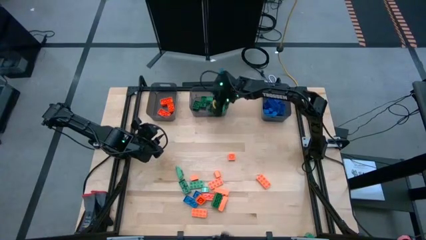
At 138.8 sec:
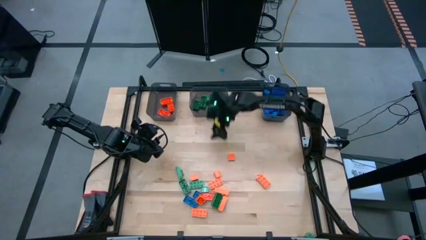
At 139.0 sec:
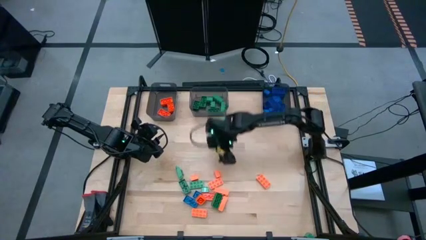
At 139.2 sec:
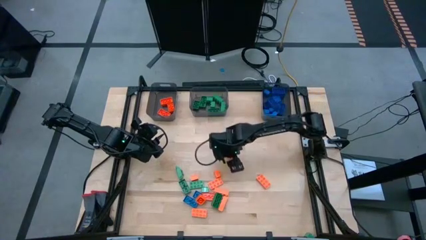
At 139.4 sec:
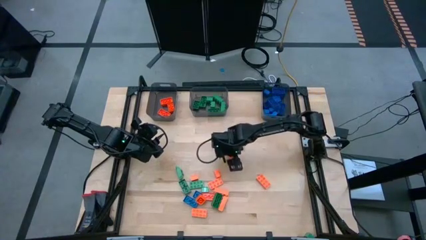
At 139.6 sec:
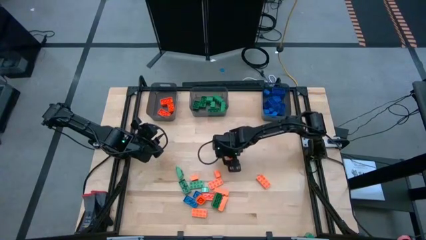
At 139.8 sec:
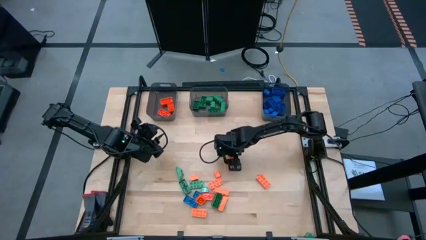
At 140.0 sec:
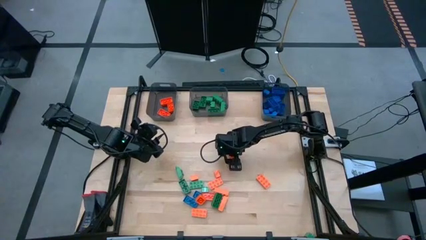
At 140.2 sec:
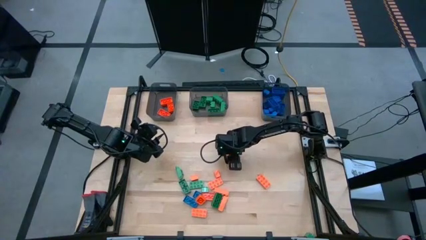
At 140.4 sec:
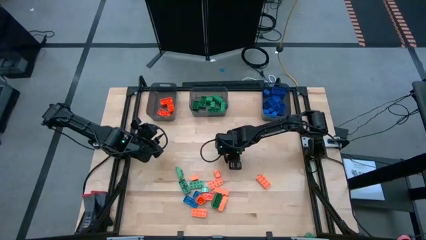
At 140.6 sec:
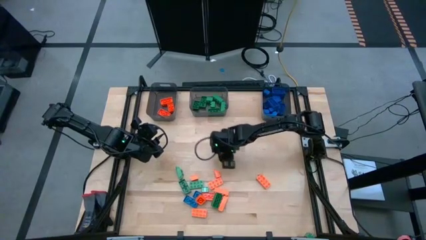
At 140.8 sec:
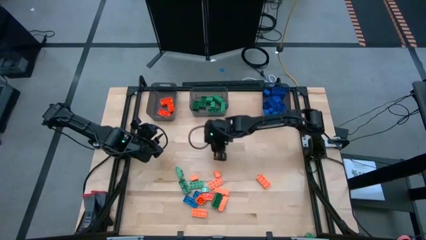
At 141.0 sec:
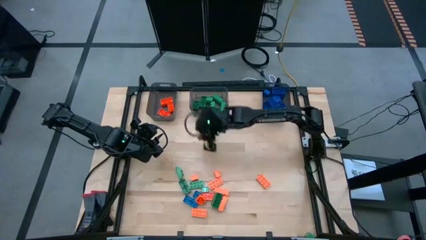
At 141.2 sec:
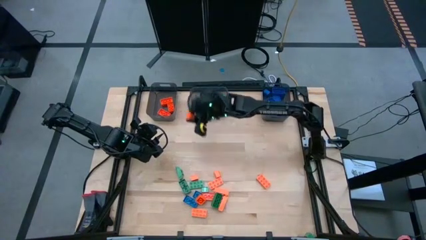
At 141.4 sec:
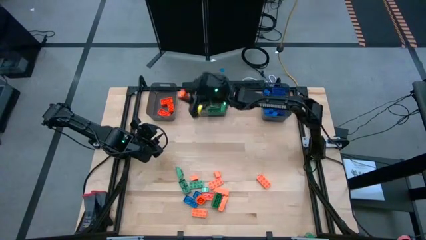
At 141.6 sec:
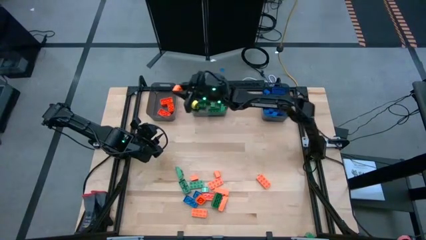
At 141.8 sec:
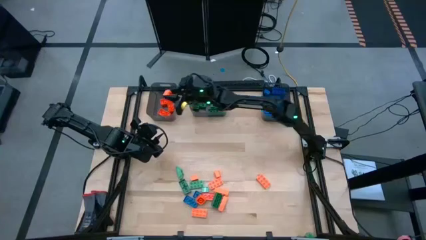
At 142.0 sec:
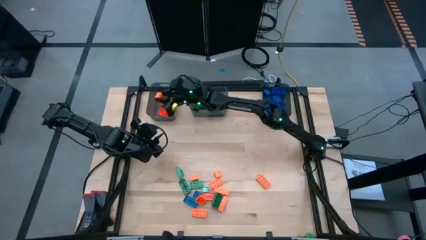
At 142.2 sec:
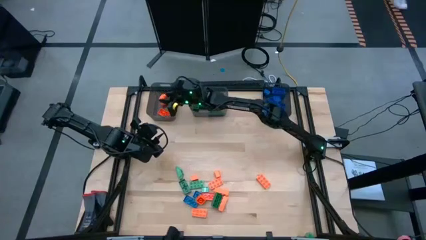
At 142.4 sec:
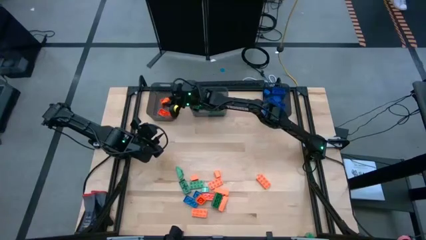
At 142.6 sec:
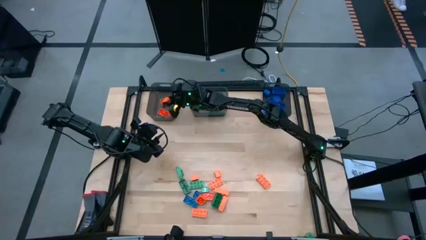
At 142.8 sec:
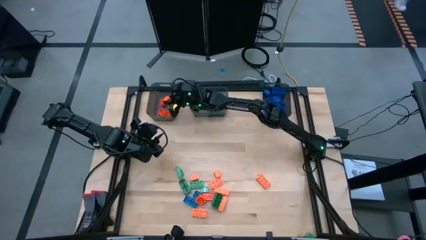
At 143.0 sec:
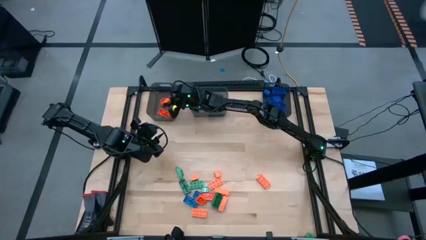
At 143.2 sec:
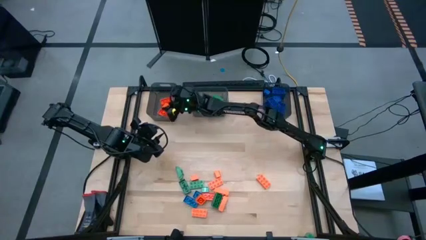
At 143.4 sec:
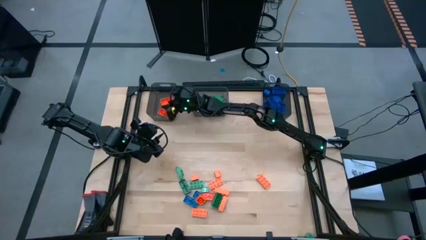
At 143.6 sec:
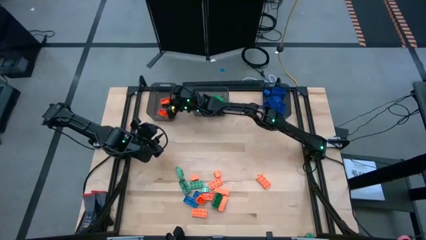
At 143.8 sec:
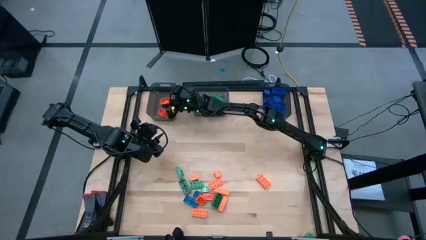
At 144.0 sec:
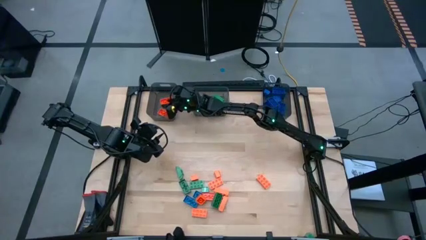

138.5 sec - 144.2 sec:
Task: Sort blocks
Put the orange game piece into the left black bin

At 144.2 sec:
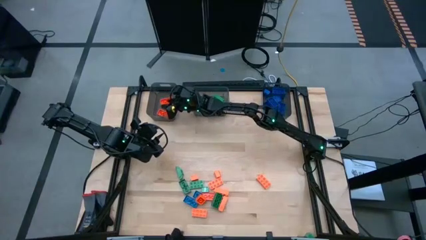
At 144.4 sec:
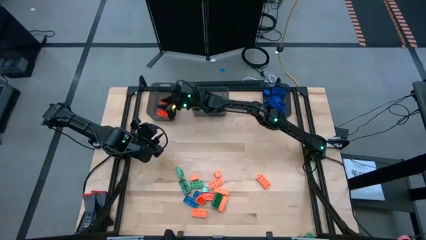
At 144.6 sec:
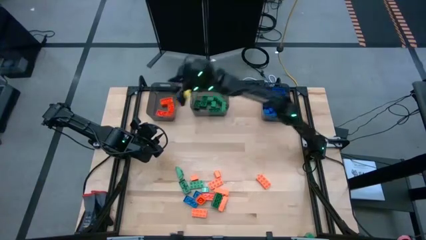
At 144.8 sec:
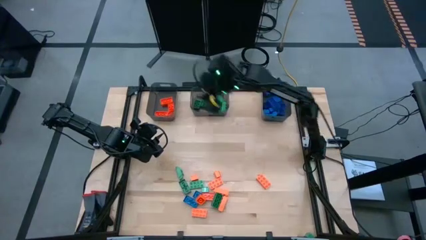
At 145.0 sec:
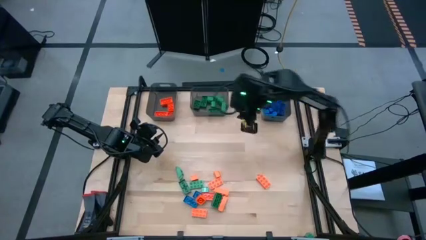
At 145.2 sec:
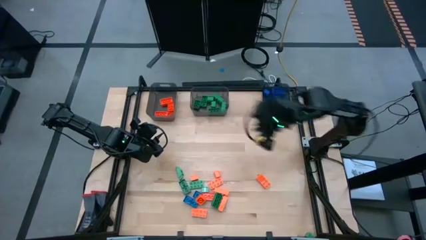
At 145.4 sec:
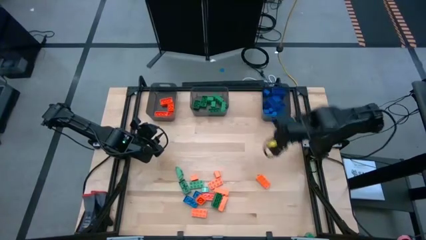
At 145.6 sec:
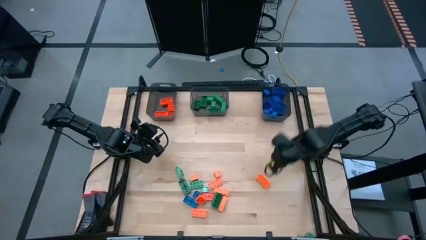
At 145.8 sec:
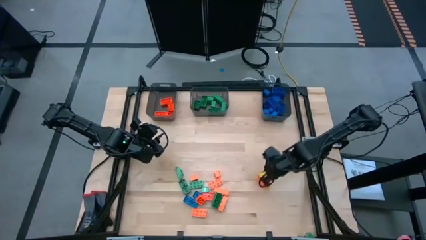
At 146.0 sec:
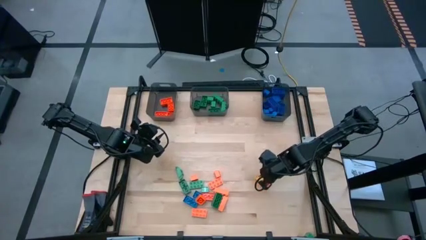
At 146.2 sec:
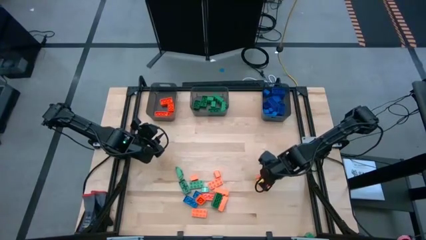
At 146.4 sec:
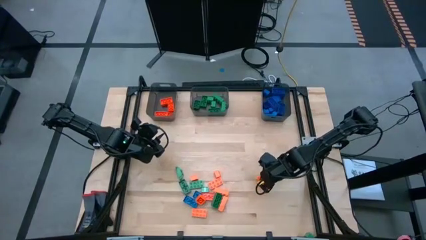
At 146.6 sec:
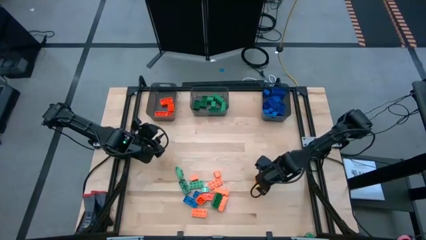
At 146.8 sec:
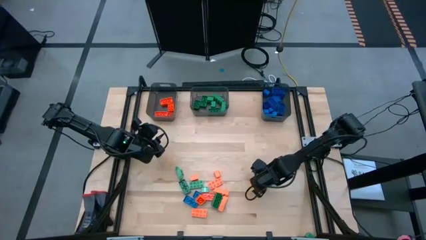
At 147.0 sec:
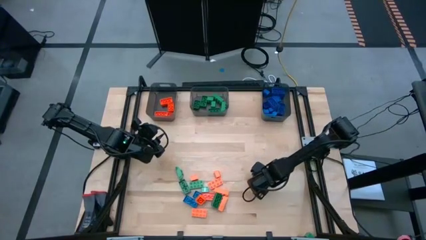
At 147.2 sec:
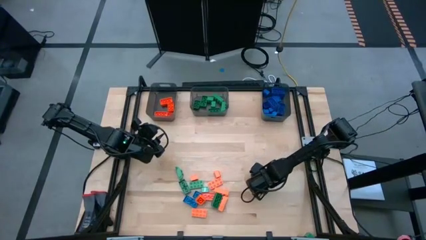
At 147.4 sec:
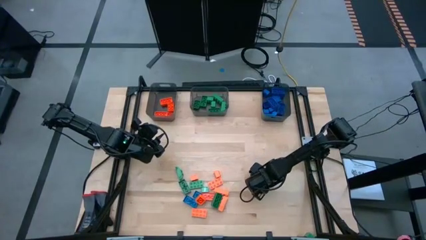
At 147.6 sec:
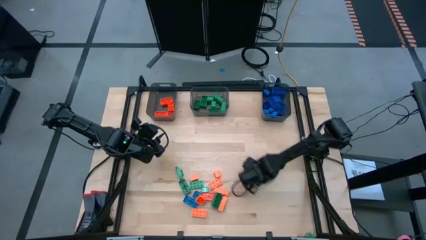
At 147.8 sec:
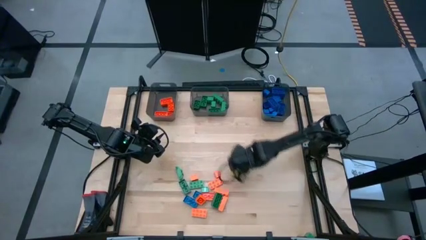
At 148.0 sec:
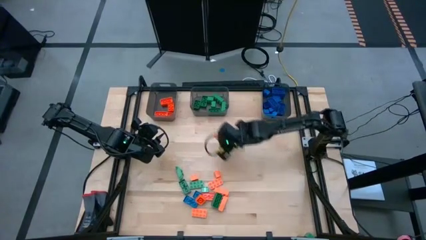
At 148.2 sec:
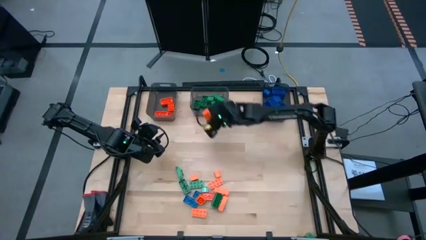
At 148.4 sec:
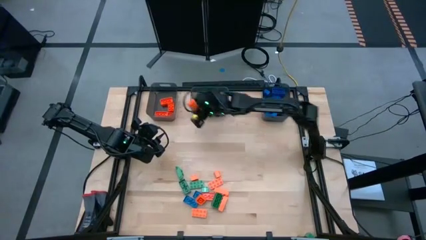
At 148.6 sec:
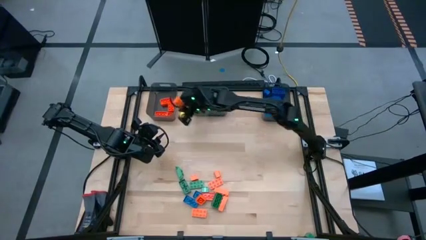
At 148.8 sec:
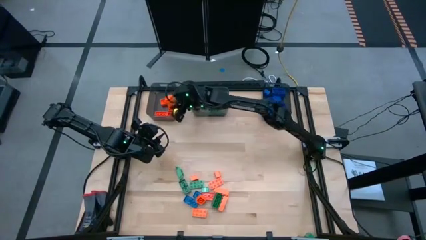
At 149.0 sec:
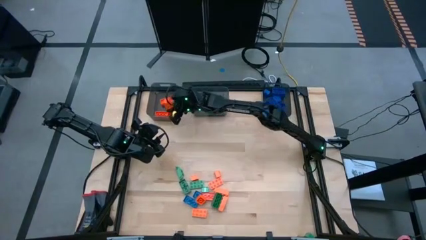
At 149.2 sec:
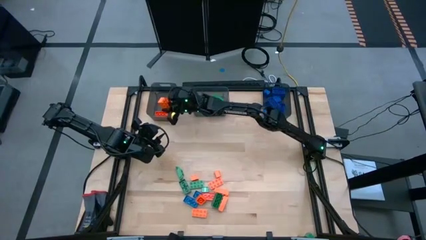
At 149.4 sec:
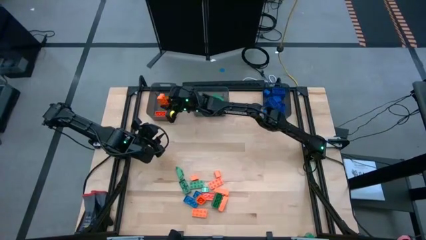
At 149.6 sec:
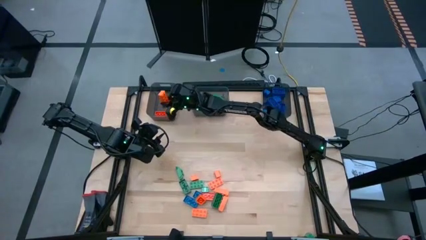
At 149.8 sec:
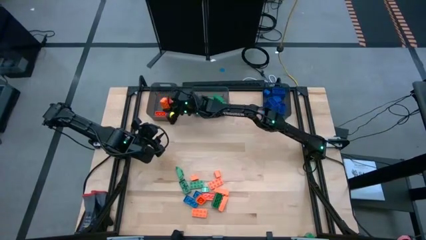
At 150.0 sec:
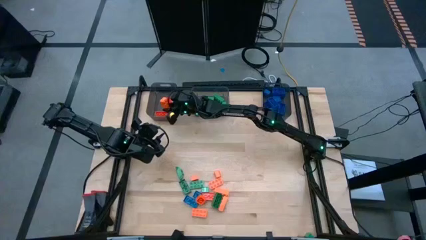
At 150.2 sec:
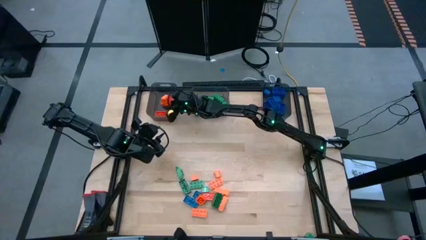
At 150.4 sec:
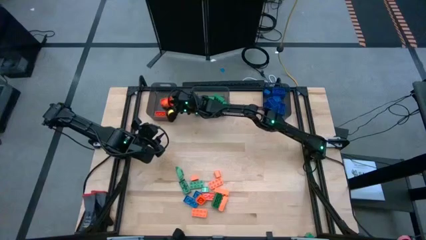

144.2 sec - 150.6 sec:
Put the orange game piece into the left black bin

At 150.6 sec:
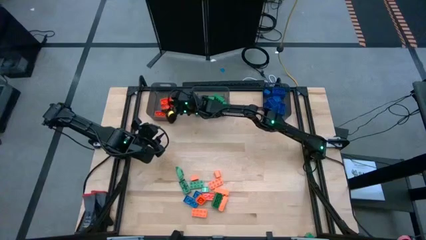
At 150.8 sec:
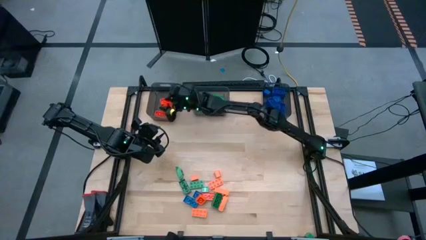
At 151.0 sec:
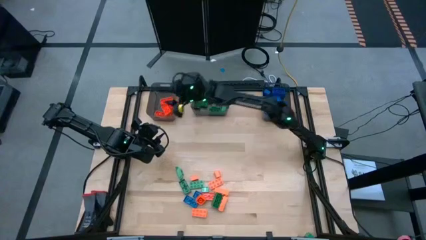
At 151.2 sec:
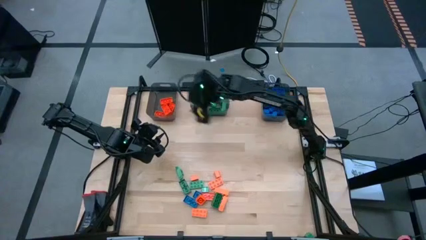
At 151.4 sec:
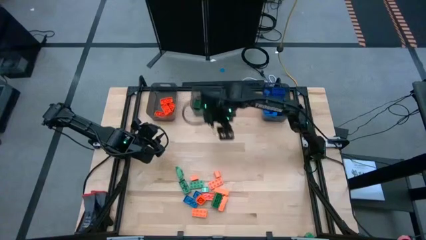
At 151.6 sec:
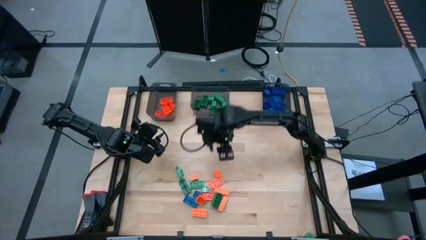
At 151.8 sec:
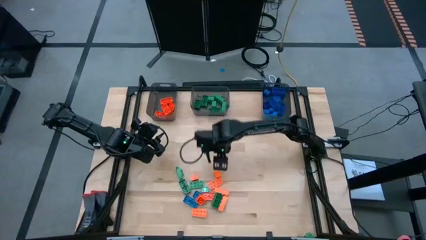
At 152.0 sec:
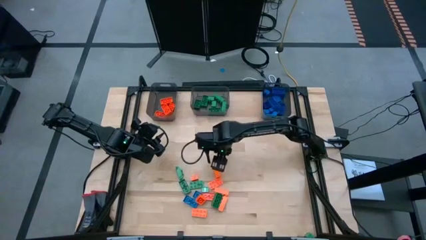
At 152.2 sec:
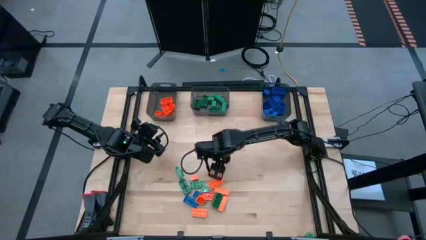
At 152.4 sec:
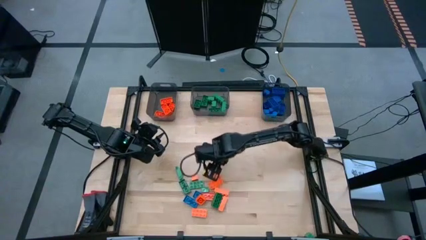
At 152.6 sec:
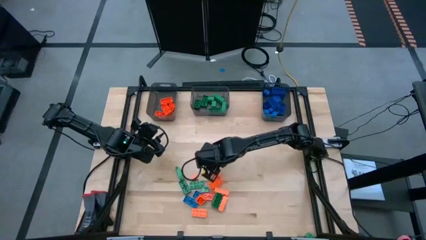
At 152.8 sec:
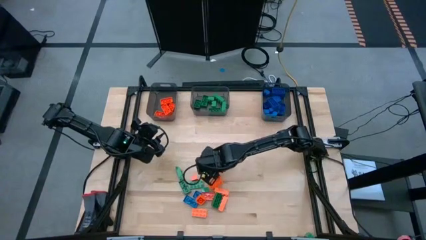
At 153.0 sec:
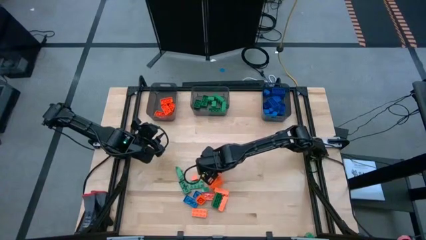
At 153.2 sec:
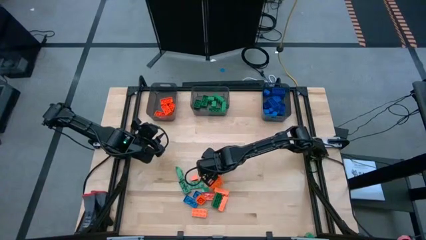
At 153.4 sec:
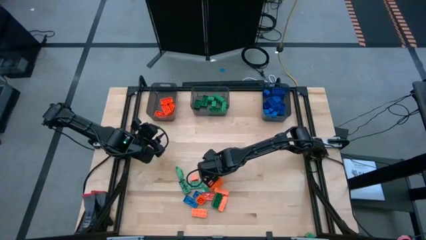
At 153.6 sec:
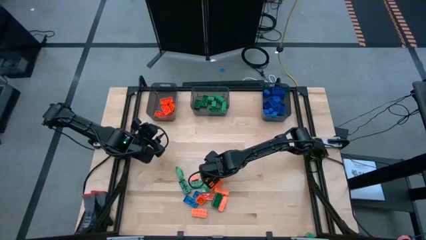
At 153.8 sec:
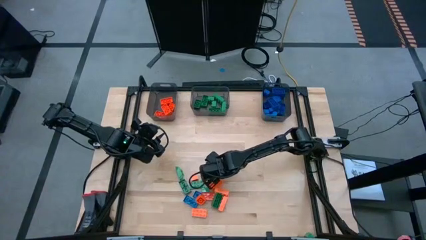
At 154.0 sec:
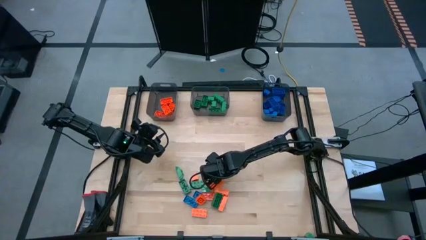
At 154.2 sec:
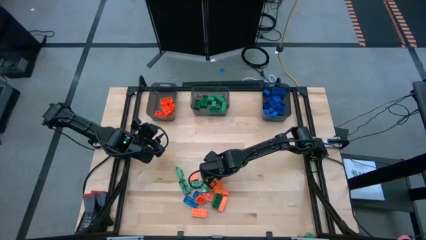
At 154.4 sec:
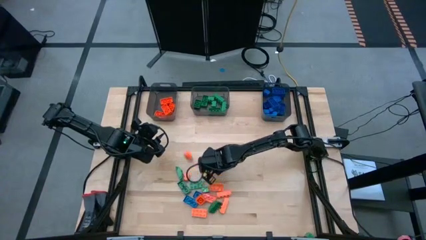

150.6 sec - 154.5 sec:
Put the orange game piece into the left black bin
